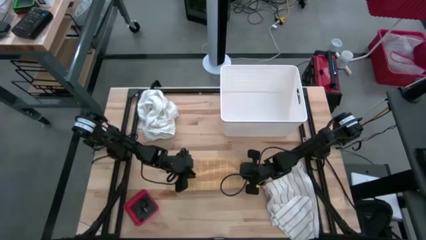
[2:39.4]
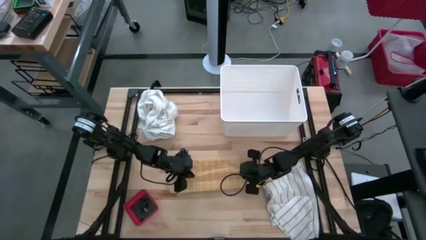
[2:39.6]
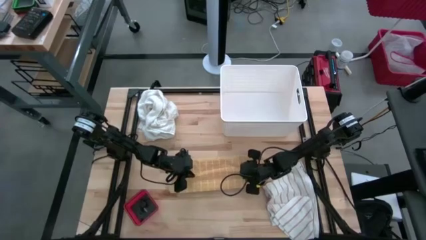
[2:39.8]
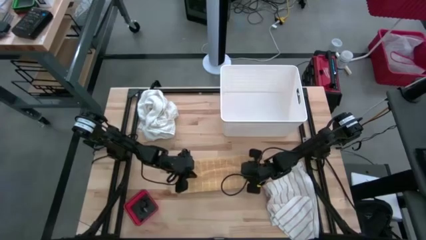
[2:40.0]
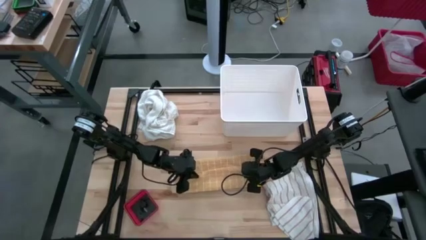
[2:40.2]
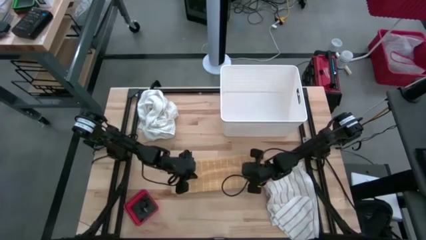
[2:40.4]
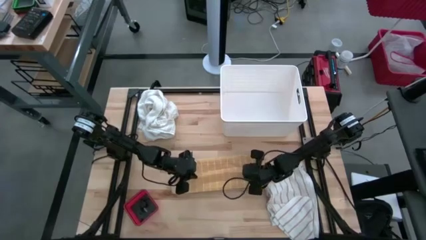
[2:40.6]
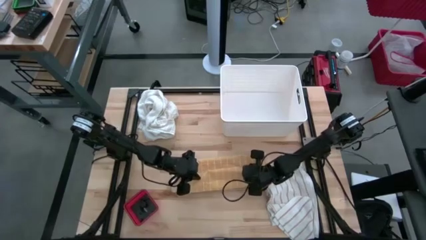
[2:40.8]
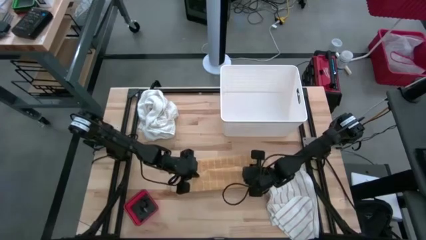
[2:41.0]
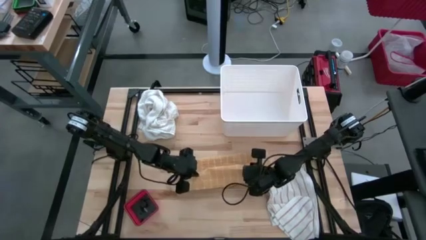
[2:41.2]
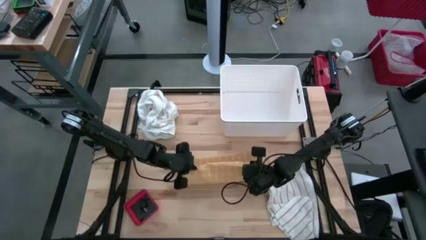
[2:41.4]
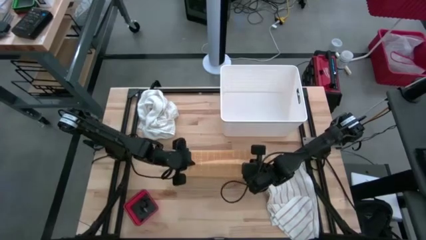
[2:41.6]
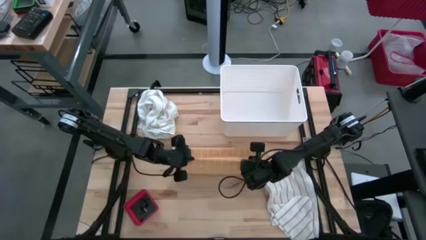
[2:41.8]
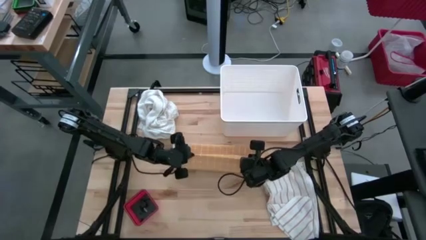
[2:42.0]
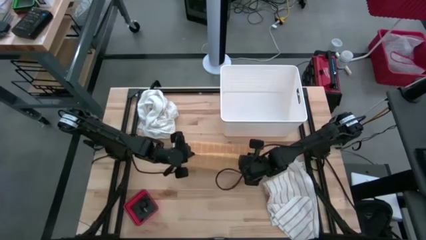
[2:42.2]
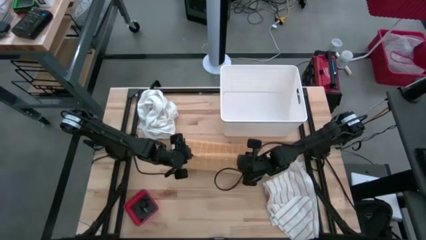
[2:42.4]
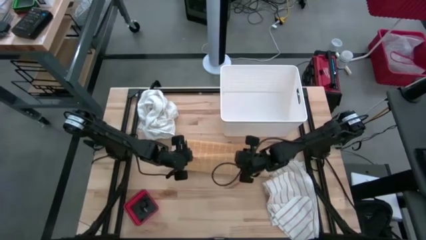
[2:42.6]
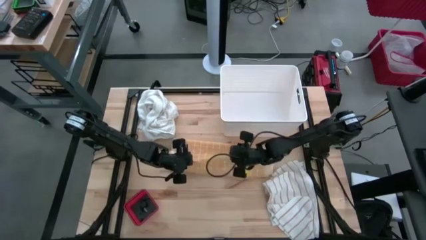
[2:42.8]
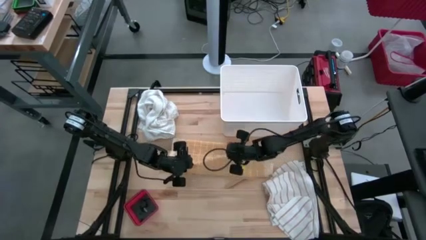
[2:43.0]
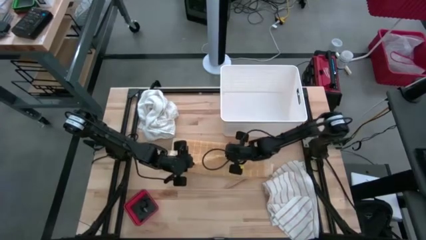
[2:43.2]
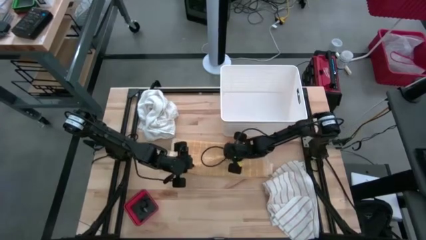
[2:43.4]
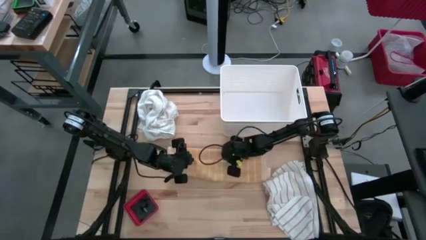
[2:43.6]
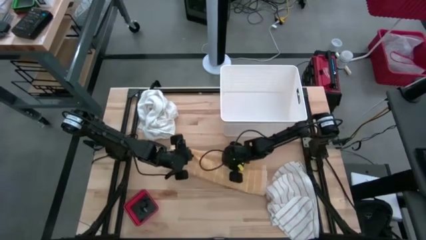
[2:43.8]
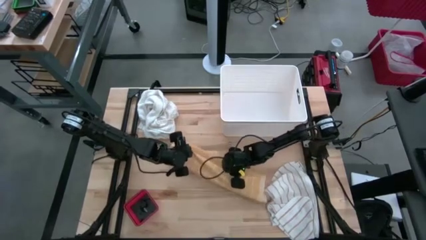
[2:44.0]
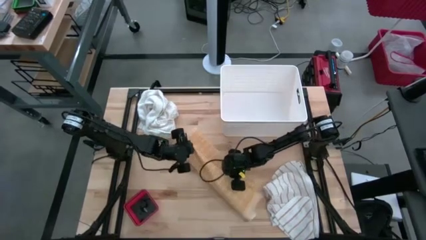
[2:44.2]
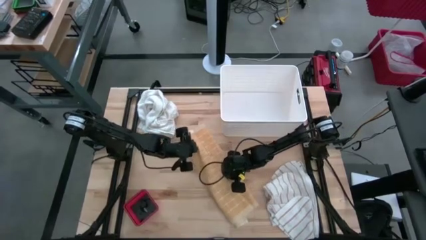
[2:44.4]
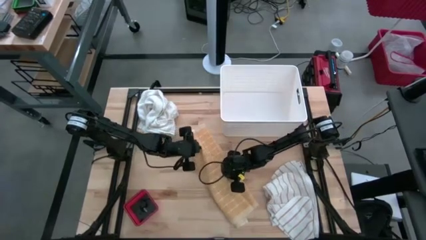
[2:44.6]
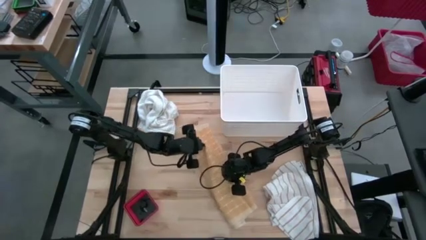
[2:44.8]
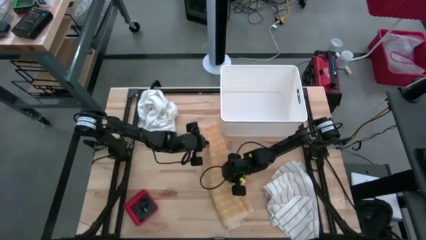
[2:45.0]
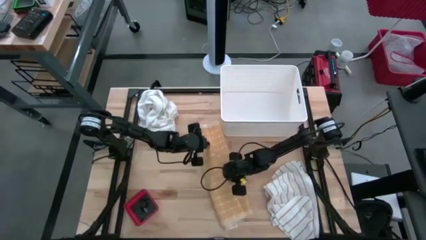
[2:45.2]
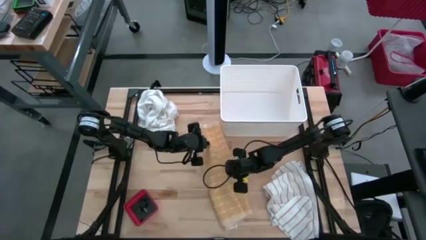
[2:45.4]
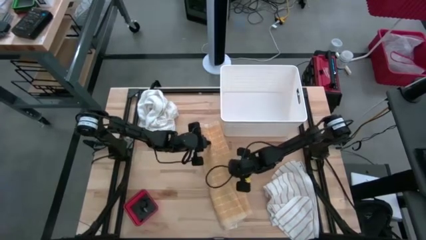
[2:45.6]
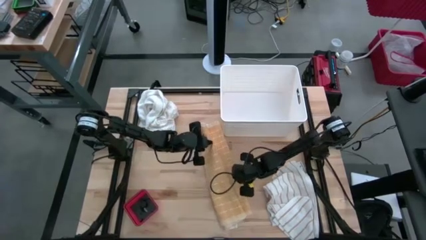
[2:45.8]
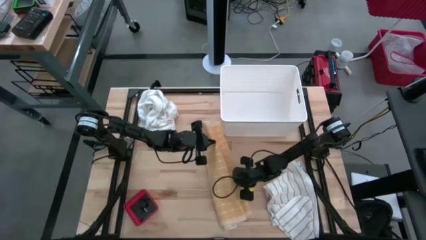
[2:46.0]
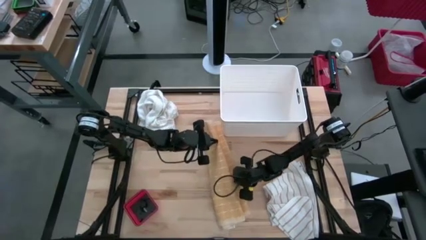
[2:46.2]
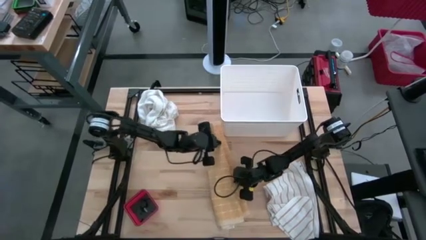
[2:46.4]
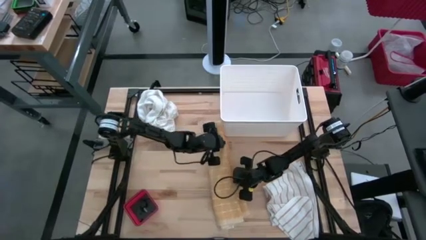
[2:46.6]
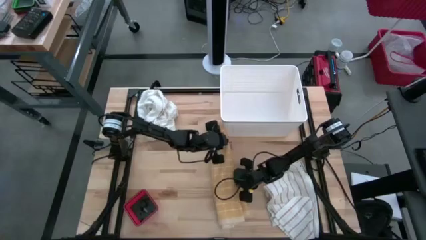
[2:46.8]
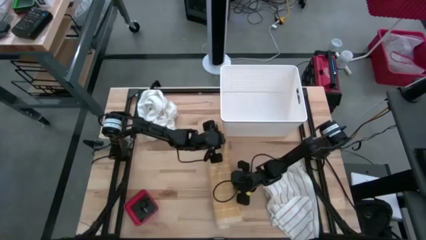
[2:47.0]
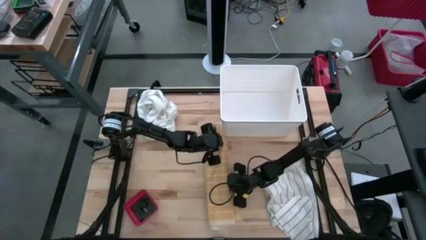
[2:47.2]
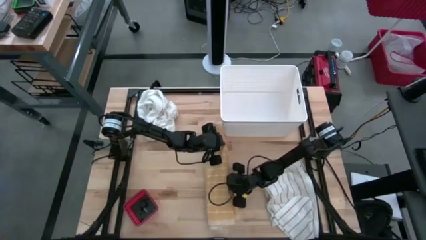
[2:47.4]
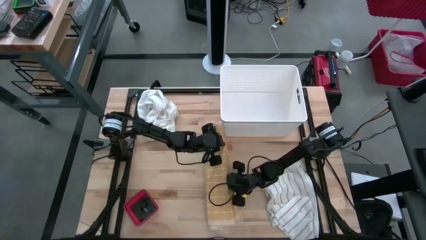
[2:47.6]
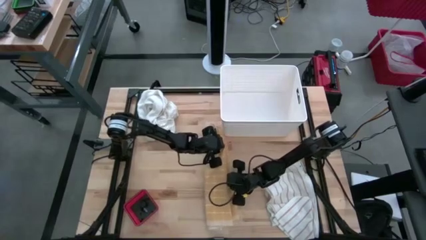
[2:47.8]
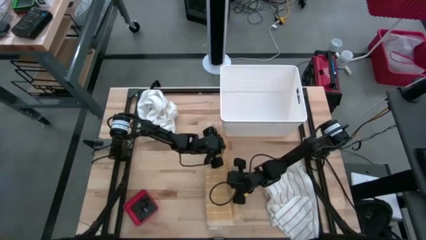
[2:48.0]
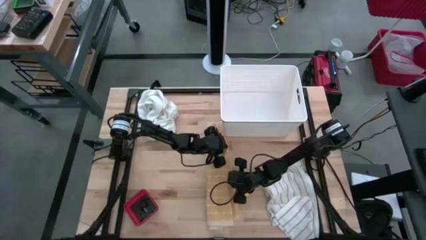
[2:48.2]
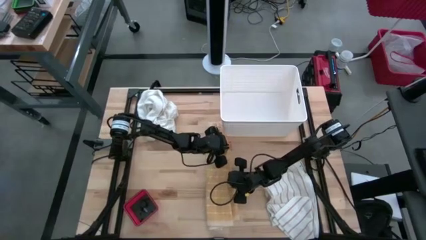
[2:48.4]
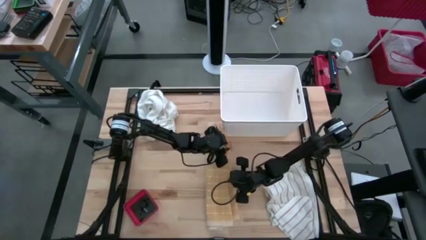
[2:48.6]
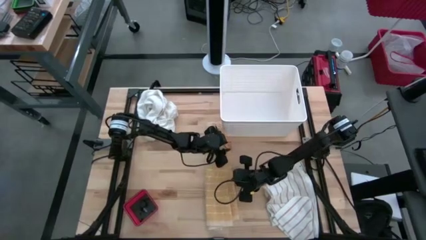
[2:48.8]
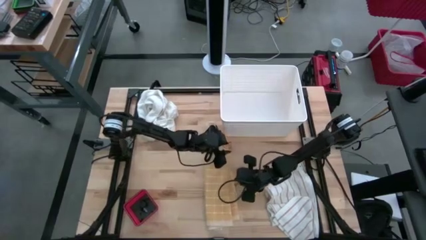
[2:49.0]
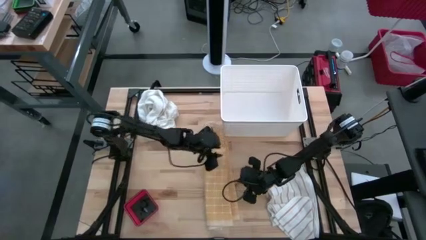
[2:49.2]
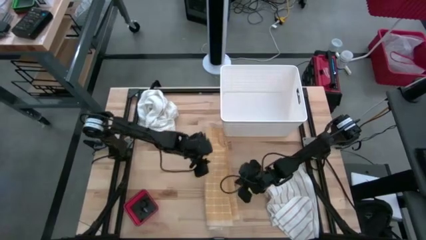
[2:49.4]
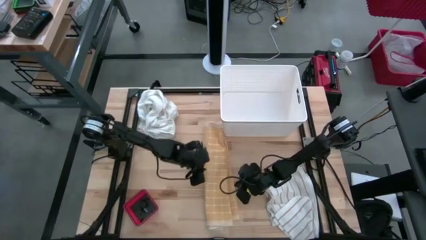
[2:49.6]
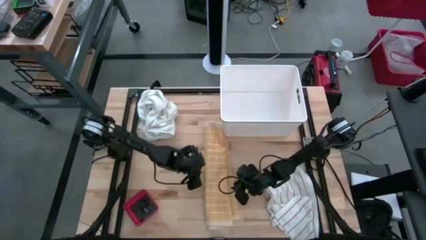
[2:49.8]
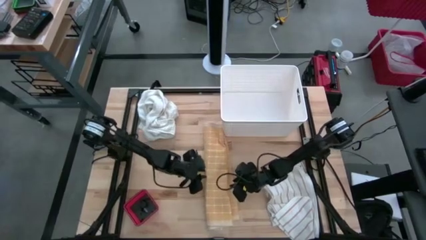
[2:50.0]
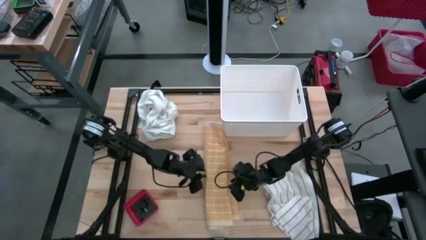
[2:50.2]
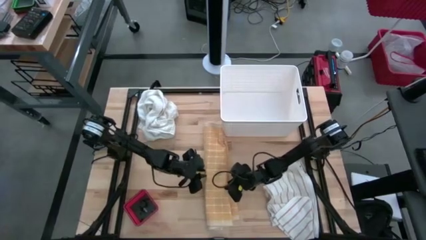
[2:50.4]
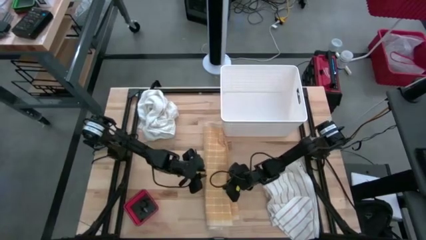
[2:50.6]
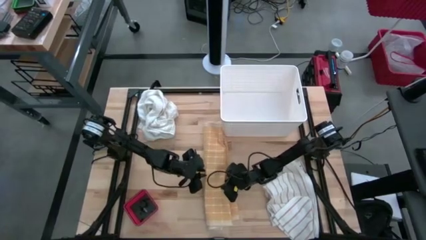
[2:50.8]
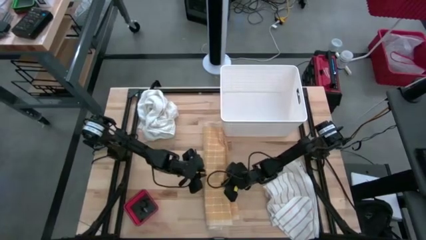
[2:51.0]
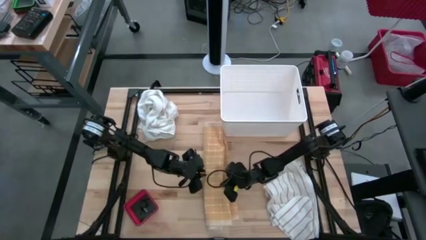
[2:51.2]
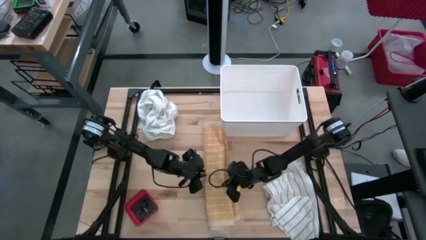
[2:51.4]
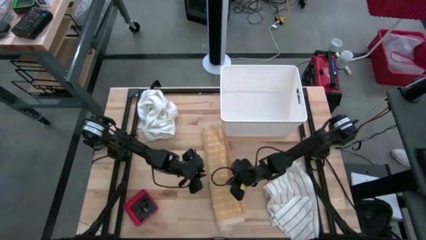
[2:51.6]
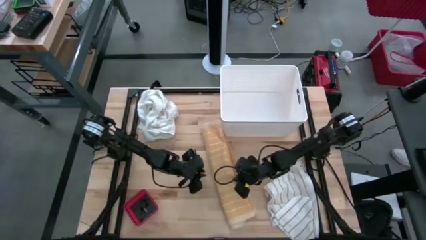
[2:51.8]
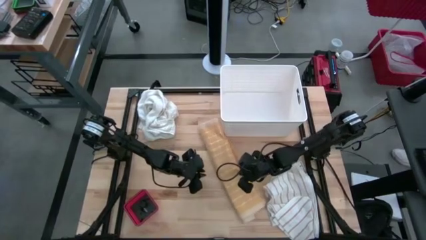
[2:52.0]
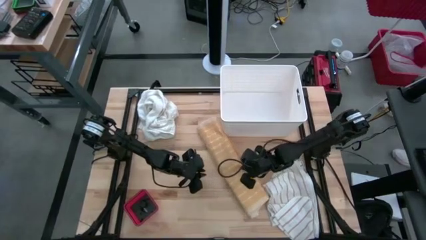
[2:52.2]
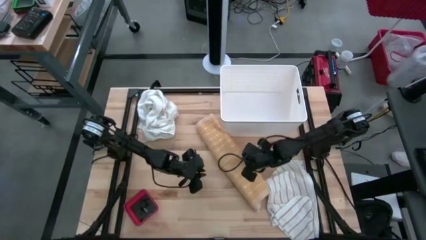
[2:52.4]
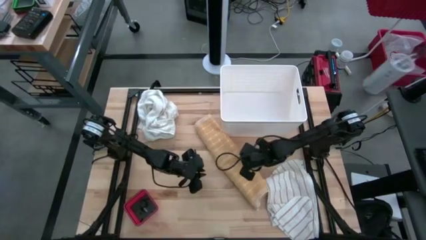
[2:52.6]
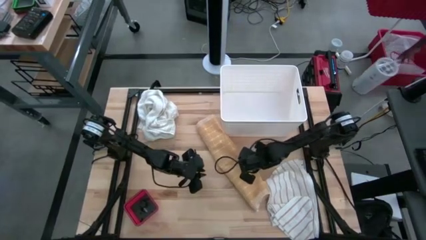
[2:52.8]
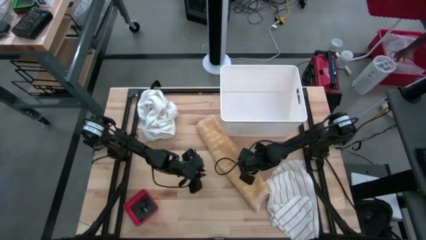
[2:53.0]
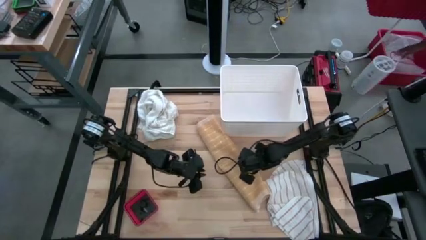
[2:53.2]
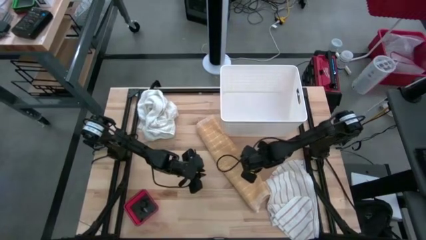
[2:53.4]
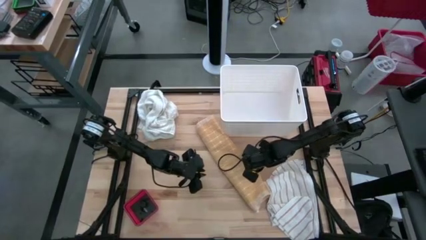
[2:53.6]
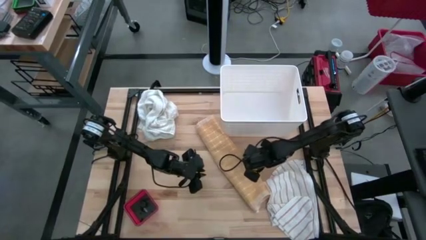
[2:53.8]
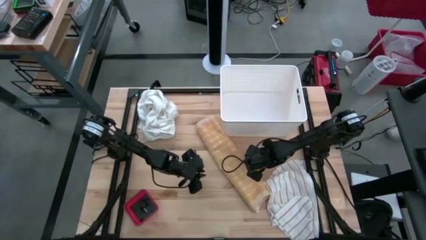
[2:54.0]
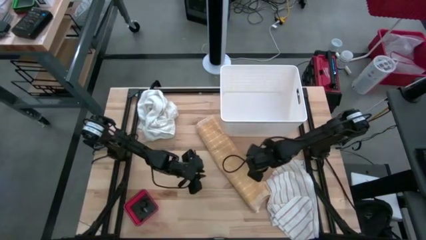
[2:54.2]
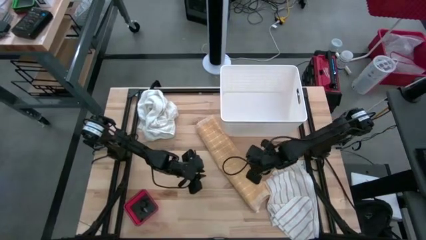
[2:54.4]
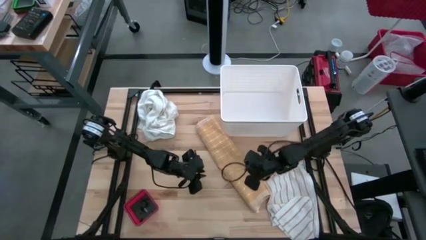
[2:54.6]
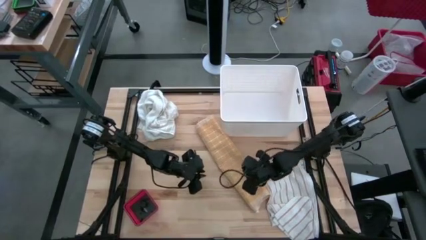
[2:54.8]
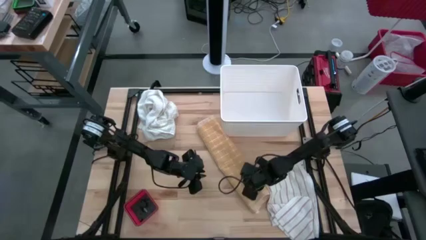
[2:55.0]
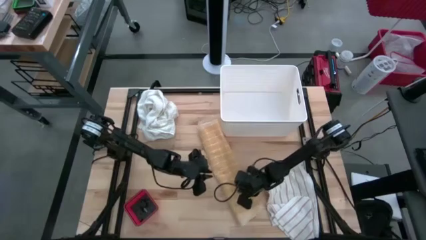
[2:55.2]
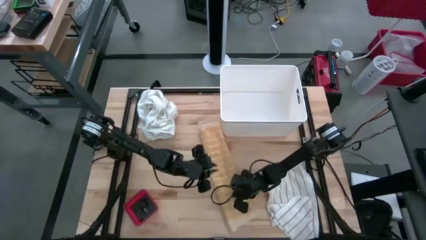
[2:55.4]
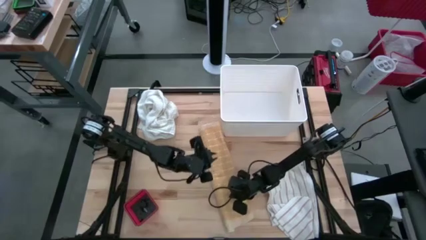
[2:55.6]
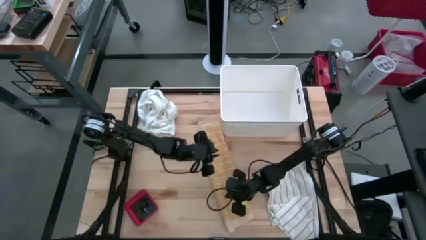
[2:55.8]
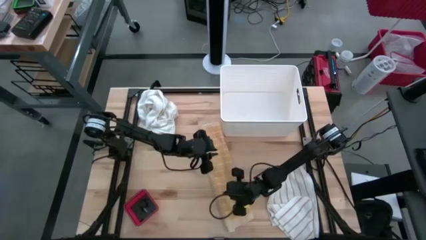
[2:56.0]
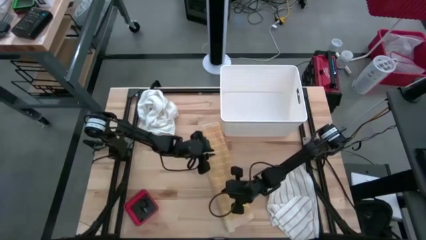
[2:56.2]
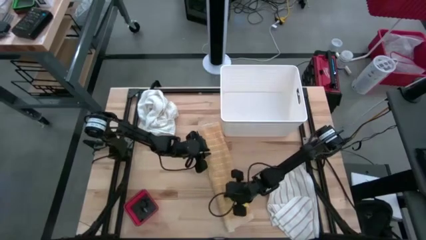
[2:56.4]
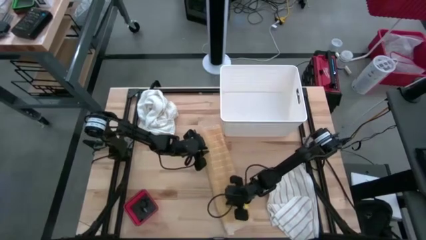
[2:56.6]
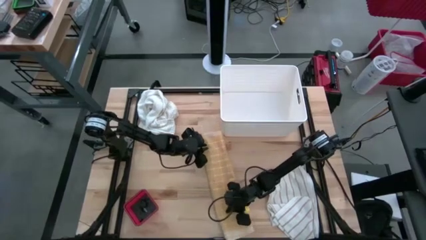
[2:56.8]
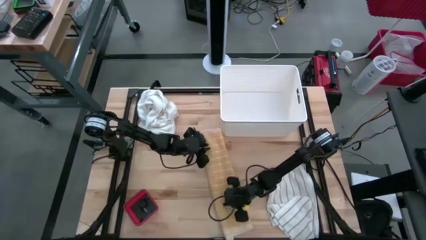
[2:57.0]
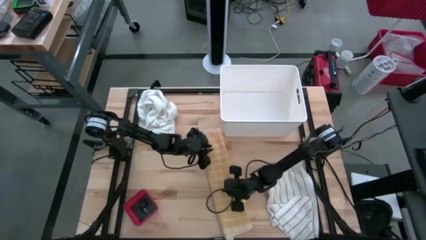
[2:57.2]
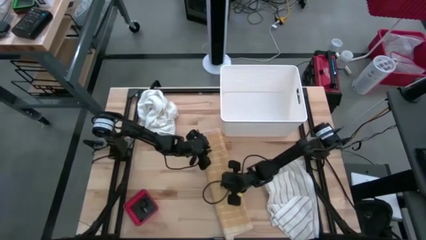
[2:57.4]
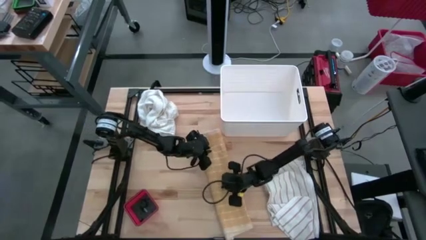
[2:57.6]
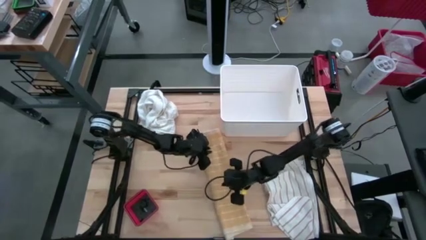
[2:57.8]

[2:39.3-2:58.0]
Task: Fold towel
Fold the yellow kitchen towel
